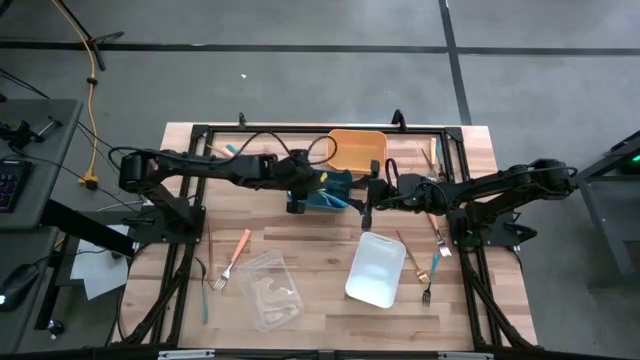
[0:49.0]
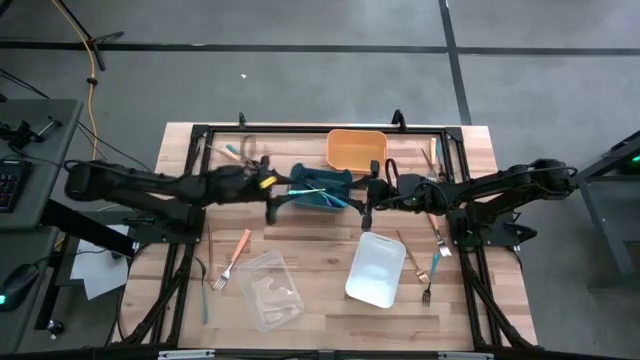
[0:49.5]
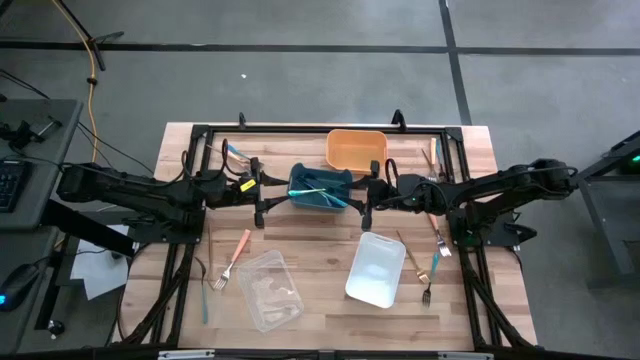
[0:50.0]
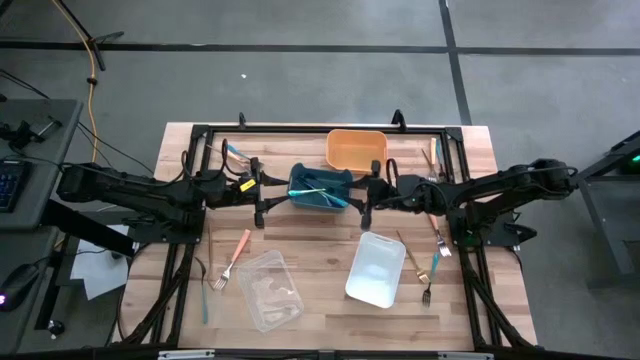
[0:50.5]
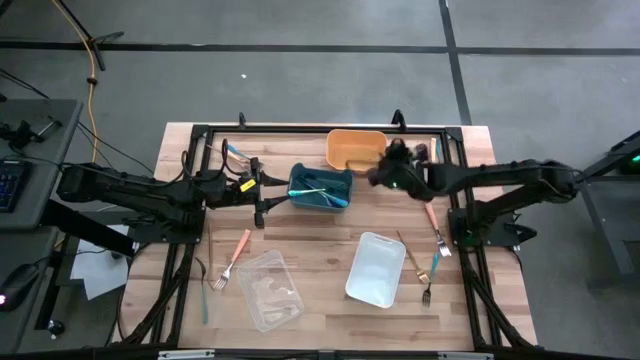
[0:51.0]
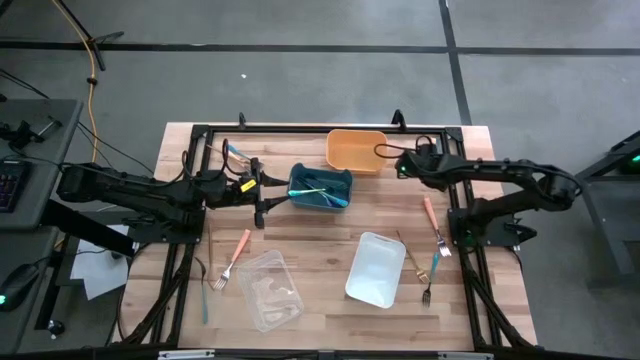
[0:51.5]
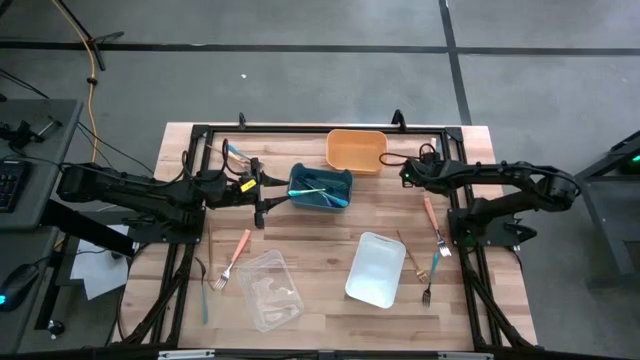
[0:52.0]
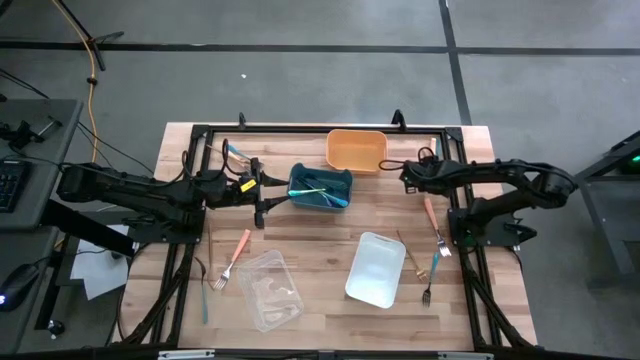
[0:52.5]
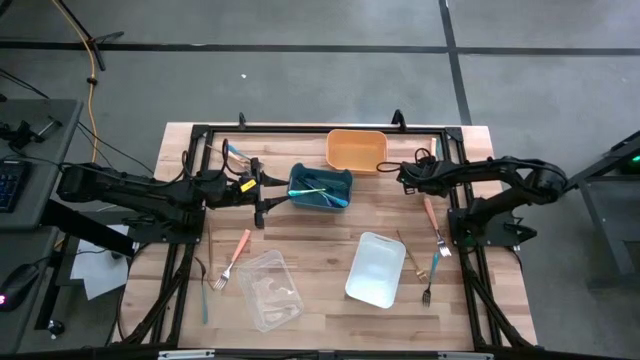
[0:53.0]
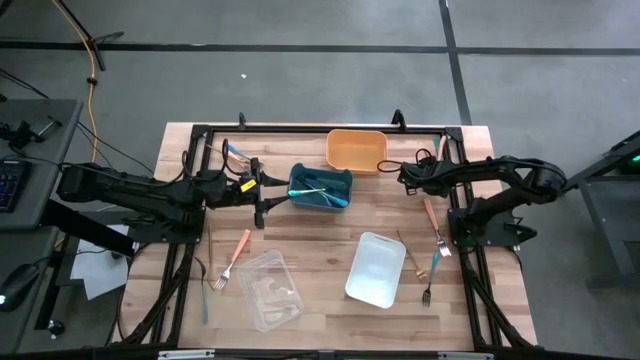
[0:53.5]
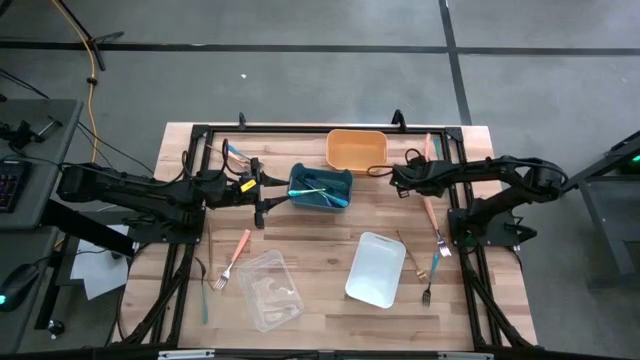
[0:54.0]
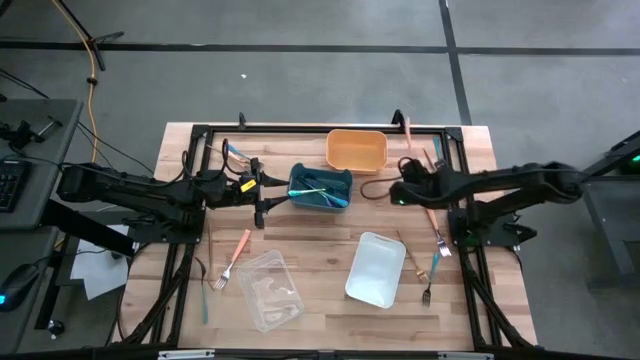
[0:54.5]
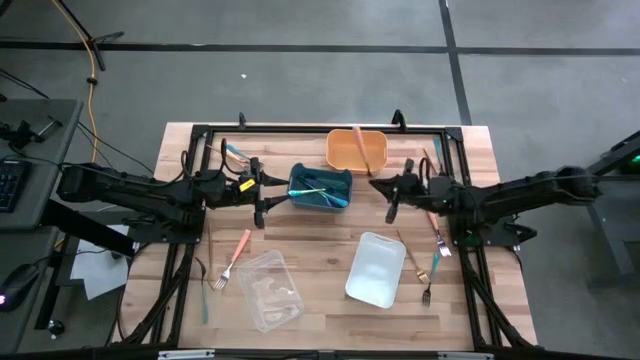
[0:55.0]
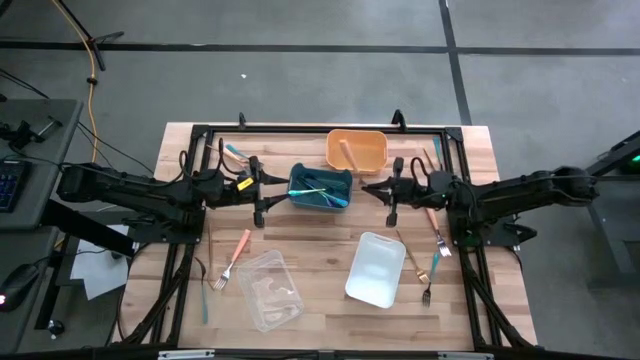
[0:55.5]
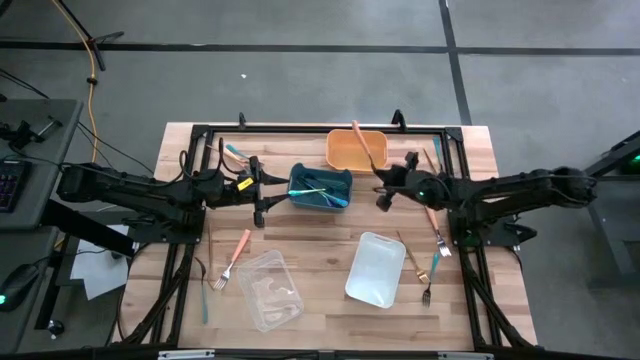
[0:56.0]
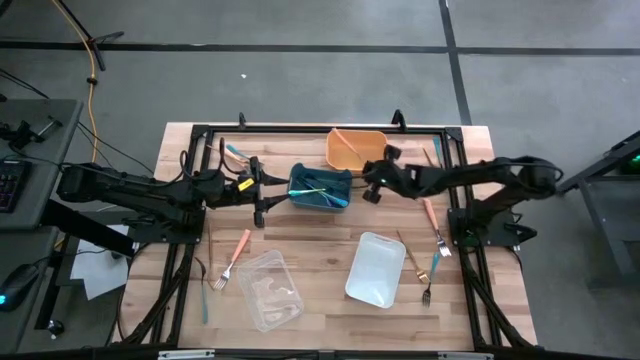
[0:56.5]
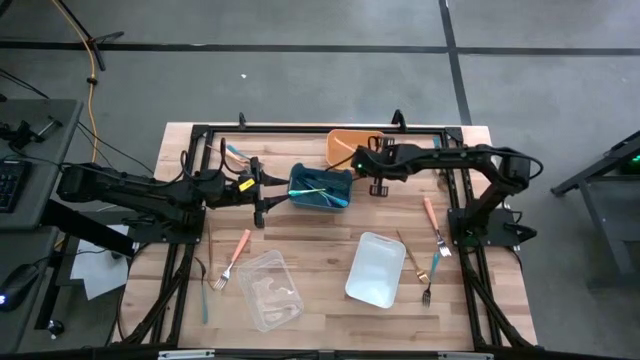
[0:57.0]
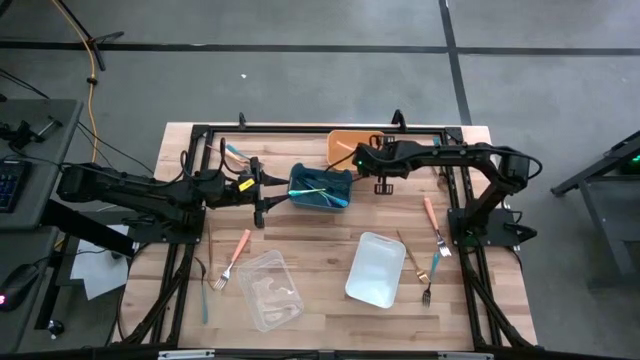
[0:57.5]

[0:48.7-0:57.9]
Task: Sort silverware by color (type)
Put the light orange fork into the yellow bin

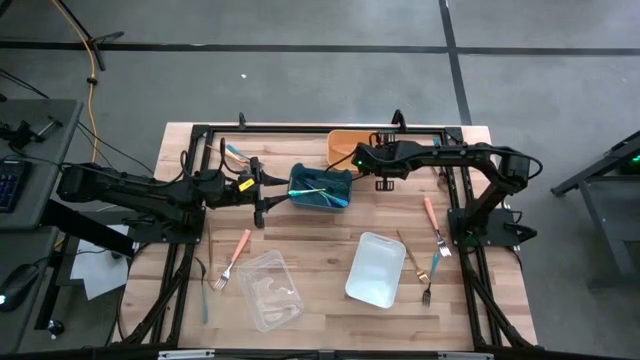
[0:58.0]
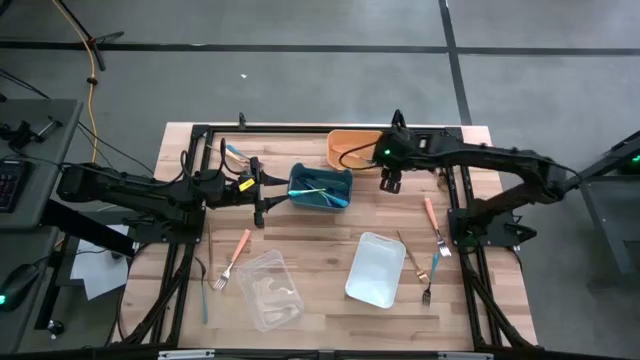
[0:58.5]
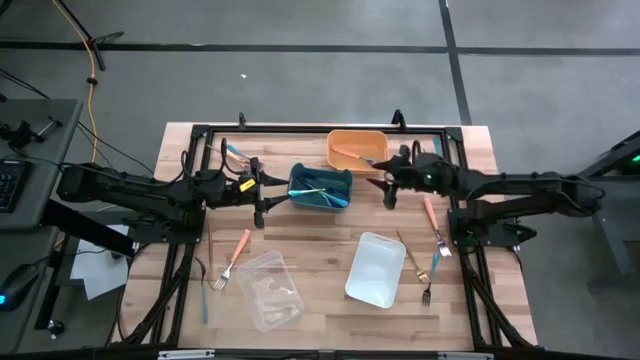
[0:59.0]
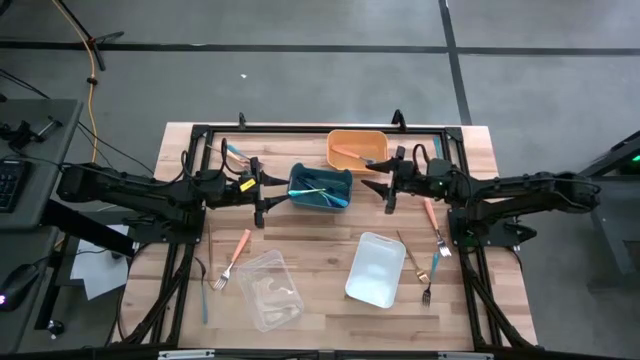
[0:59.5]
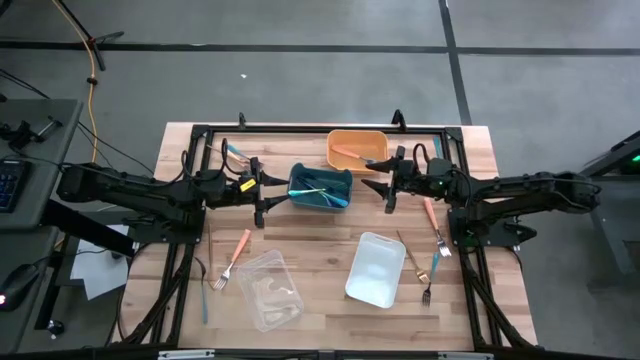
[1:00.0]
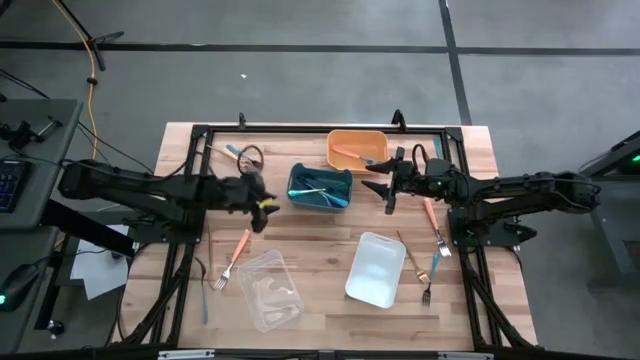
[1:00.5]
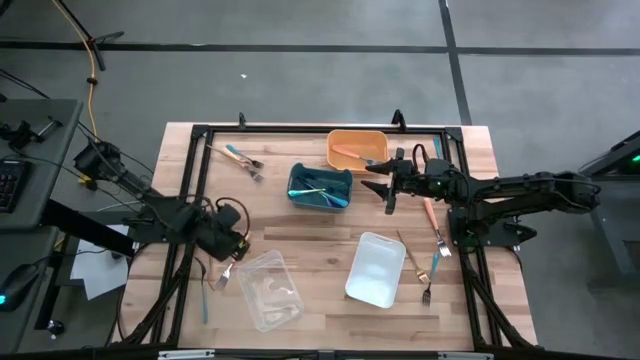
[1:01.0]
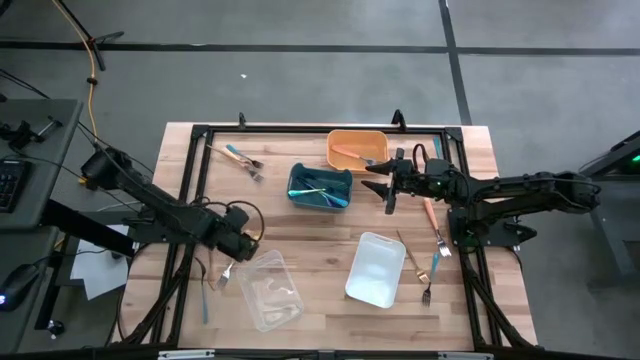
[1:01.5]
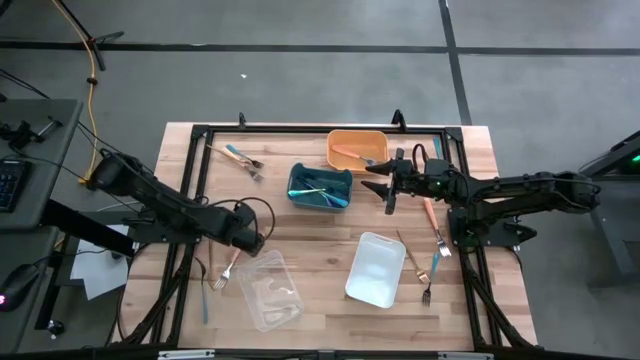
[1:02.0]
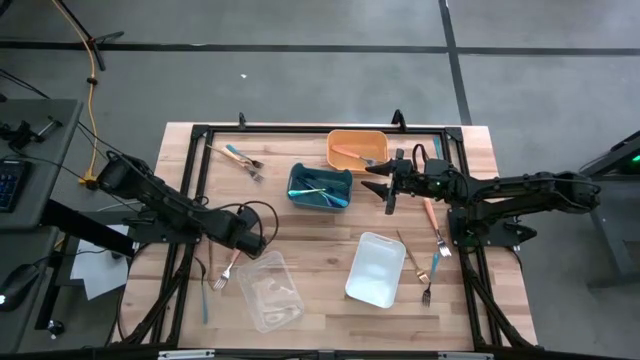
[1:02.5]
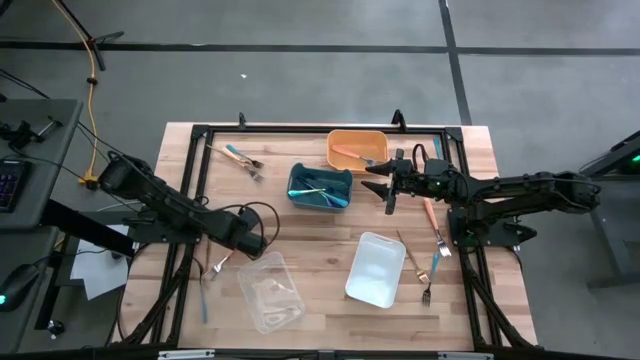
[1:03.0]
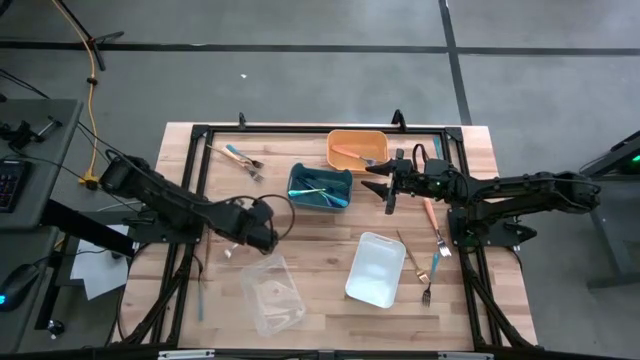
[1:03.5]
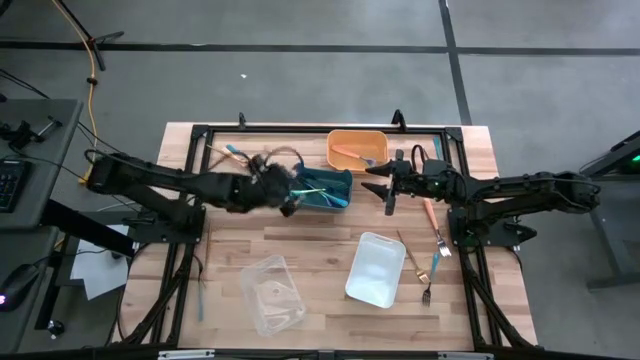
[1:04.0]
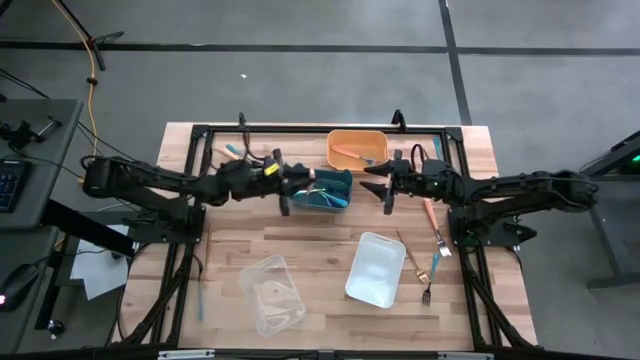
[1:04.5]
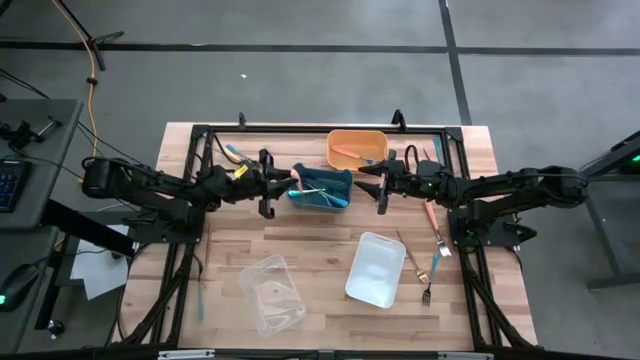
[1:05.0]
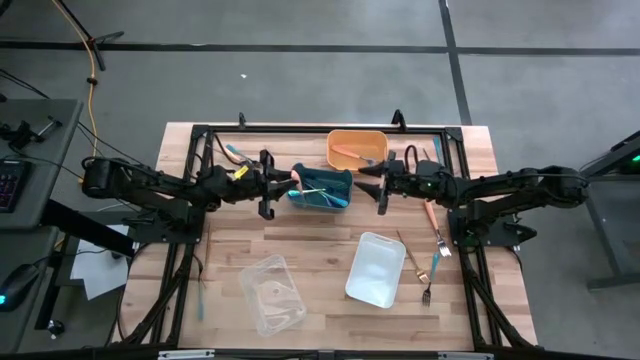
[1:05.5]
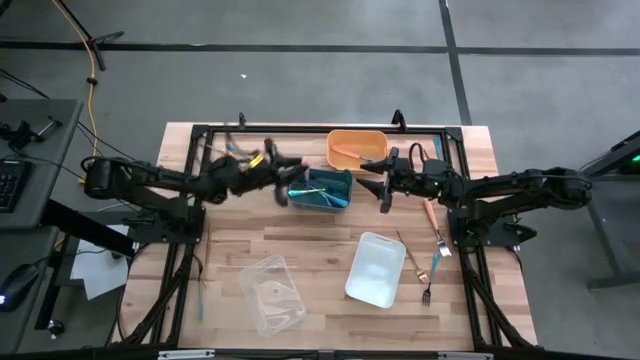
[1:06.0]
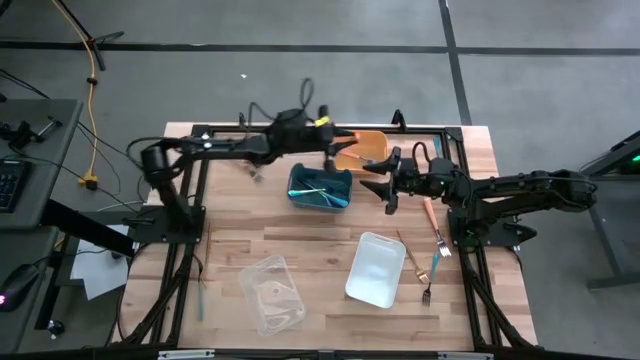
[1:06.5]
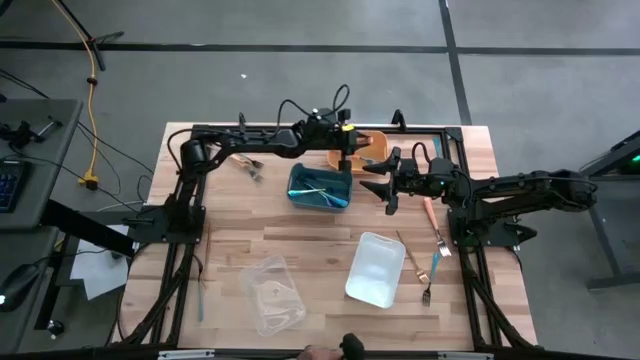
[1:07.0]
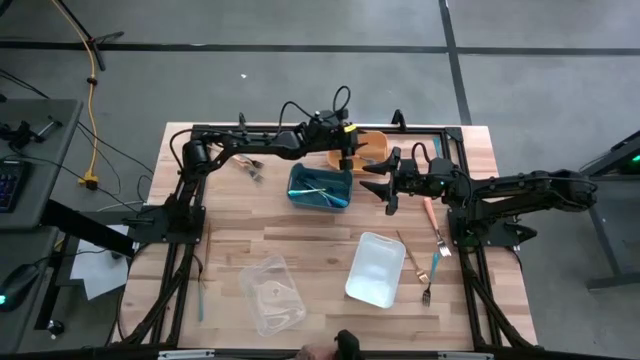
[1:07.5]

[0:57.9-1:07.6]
Put the light orange fork into the yellow bin

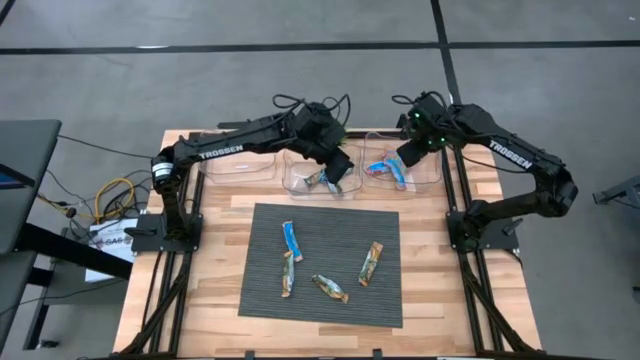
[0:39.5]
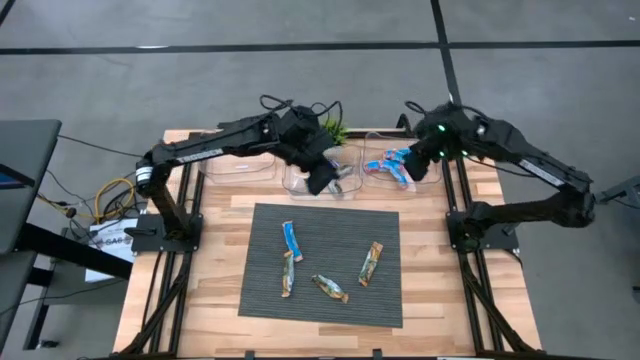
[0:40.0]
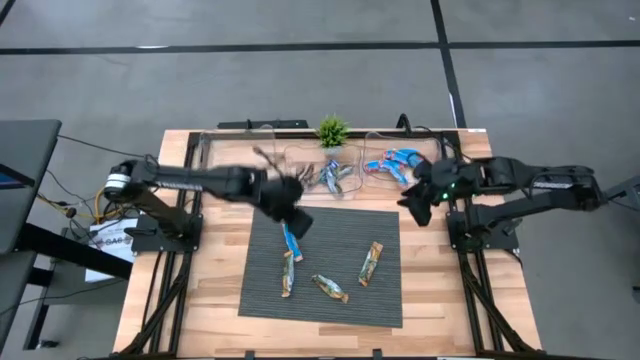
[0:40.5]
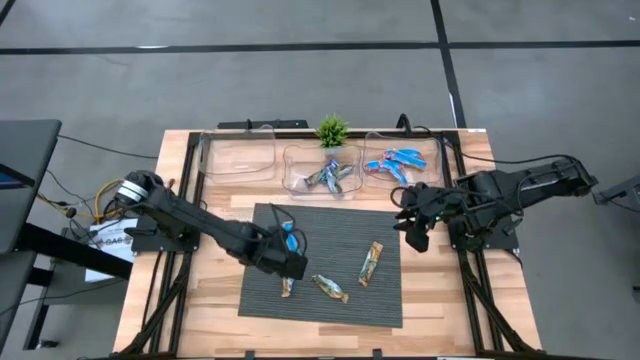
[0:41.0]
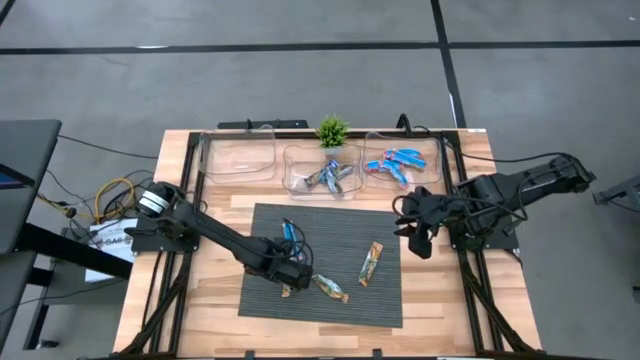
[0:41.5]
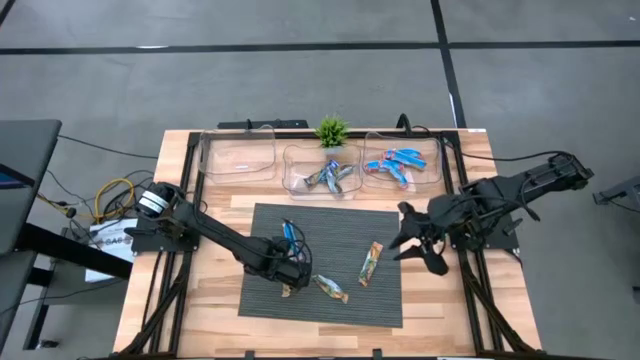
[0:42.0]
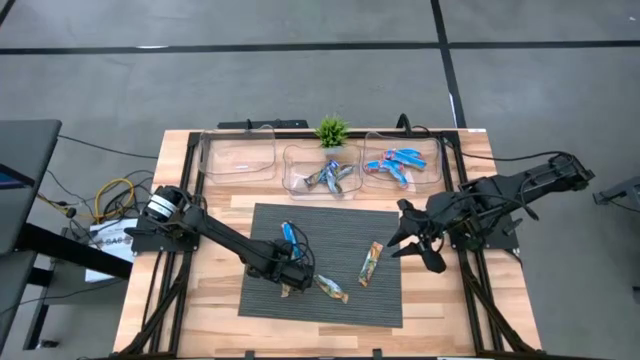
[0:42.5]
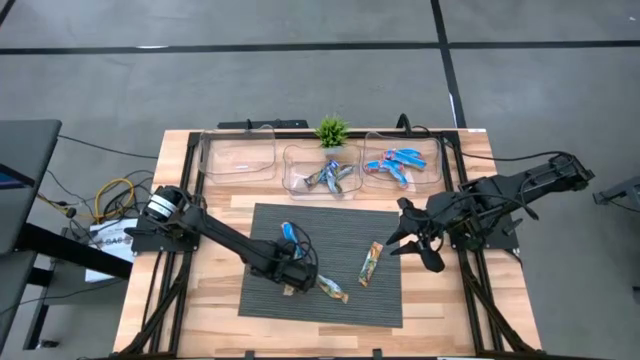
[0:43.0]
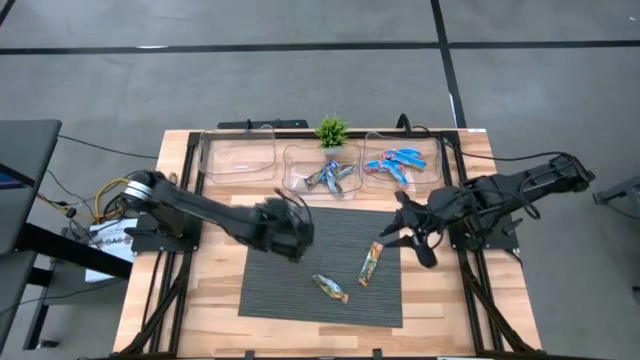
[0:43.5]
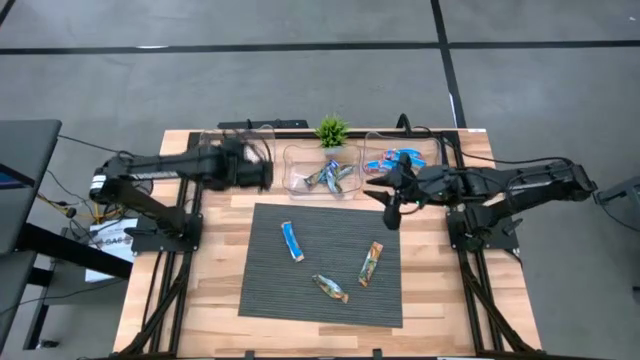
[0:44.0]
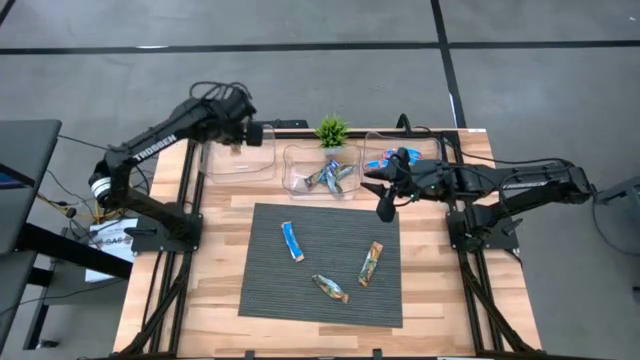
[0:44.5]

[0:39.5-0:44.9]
Task: Pick and place Granola Bars by type
Put the yellow granola bar into the left transparent bin
